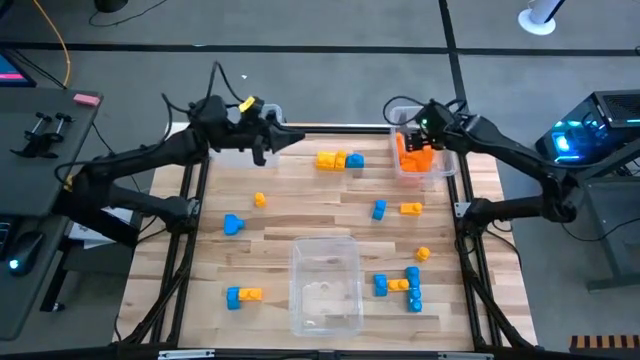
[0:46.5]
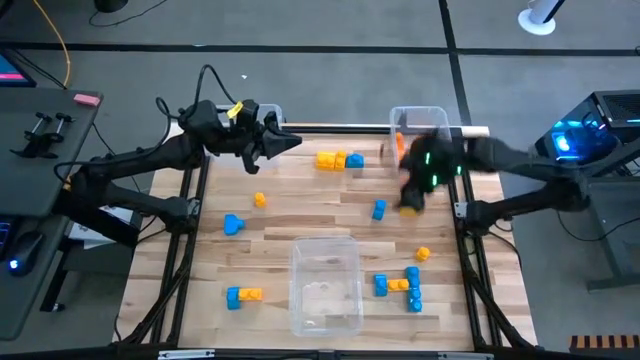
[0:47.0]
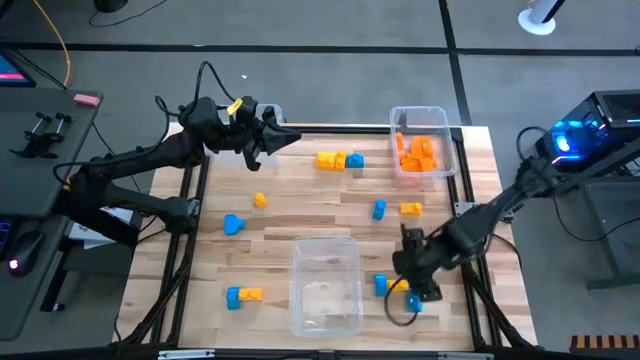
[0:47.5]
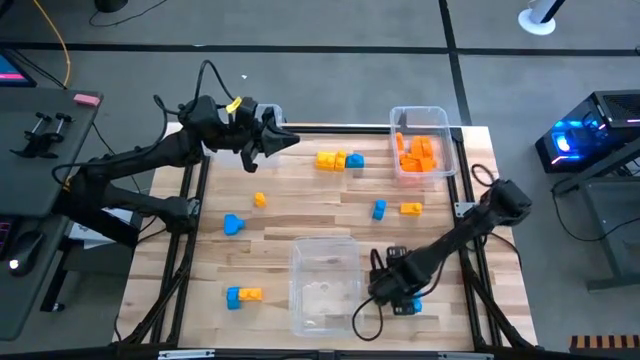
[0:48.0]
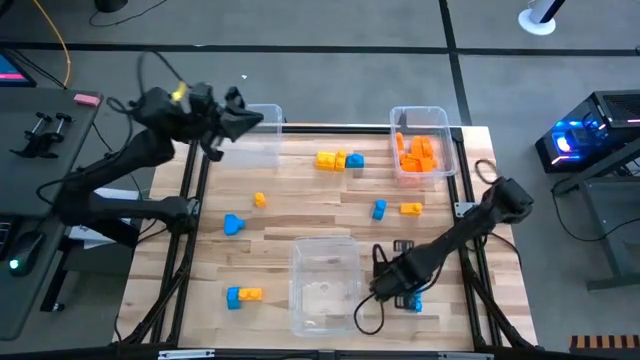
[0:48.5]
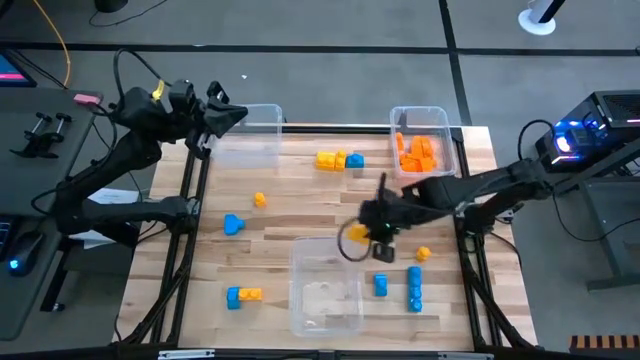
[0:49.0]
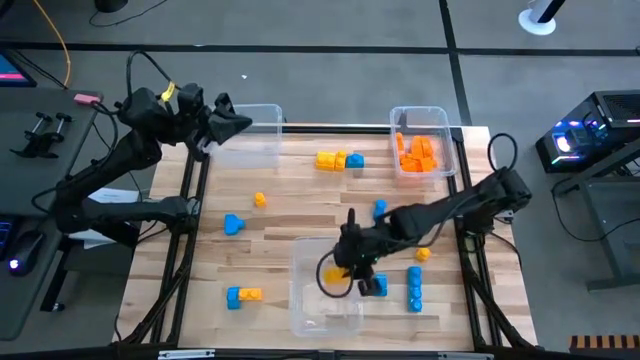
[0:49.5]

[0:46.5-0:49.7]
Task: Sort blocks
Put the yellow game piece into the bottom transparent bin

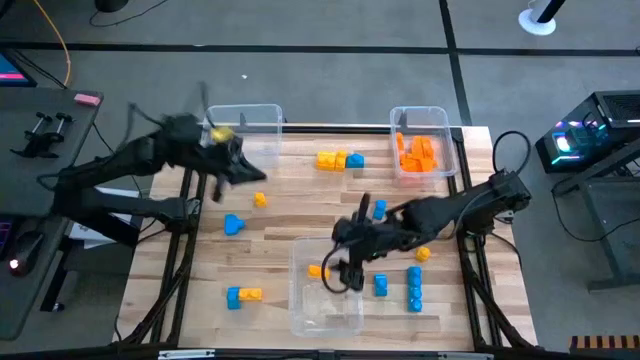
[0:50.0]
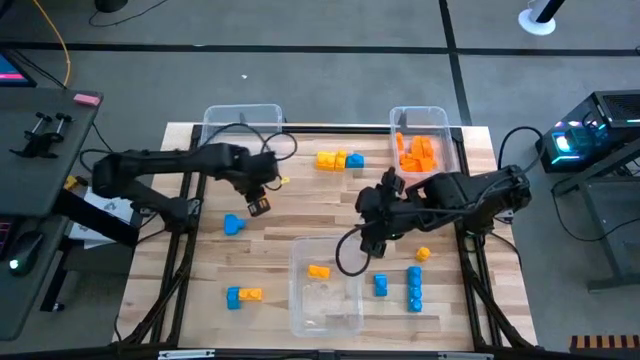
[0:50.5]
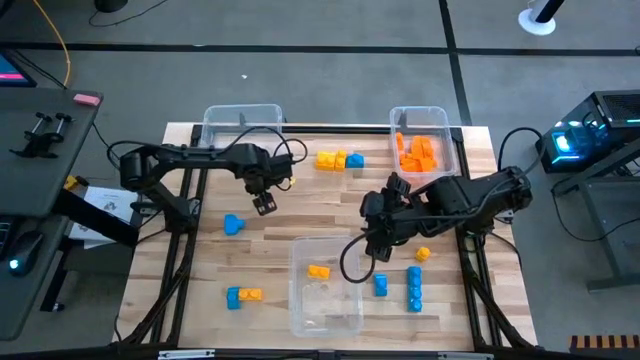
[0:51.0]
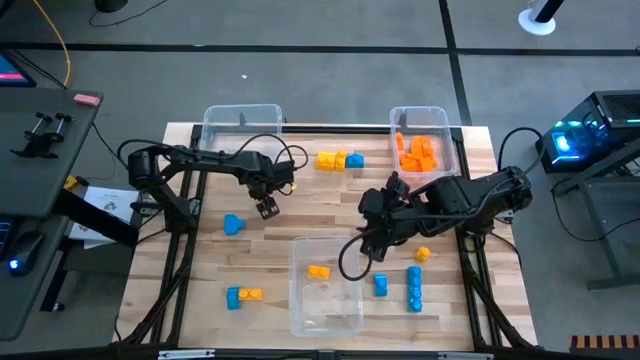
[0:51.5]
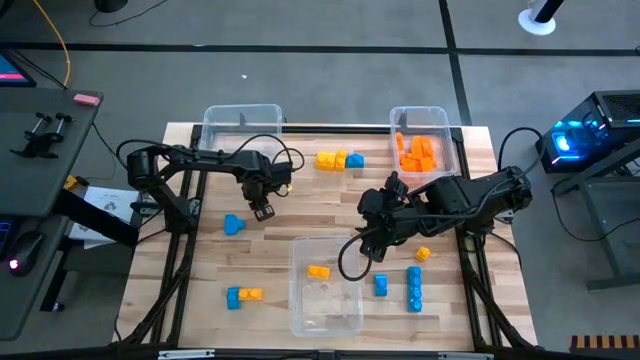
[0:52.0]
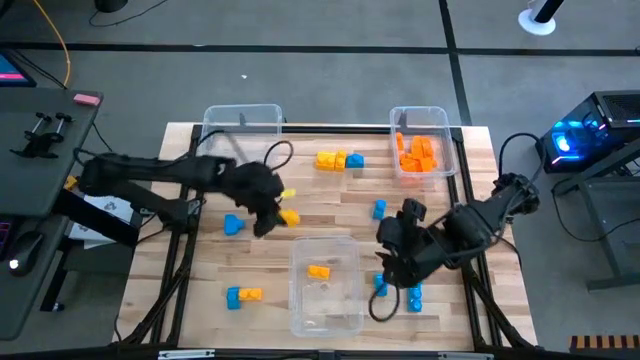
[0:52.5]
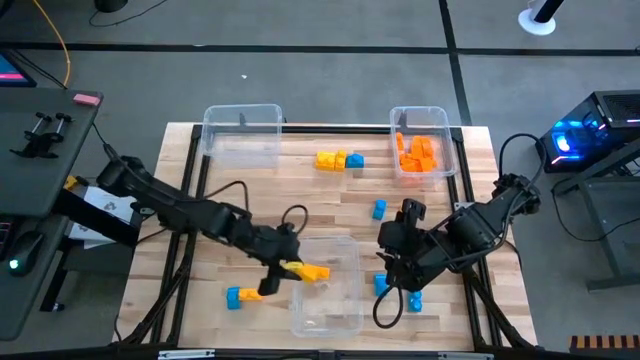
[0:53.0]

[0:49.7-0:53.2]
Put the yellow game piece into the bottom transparent bin

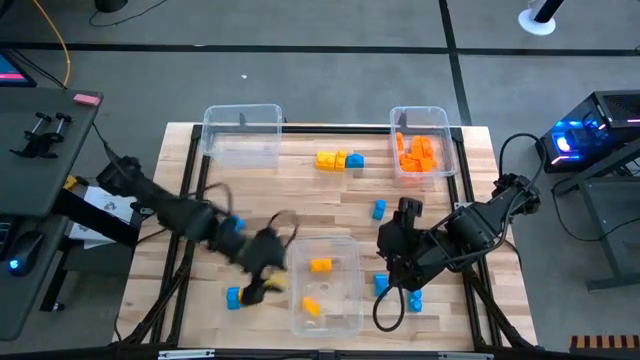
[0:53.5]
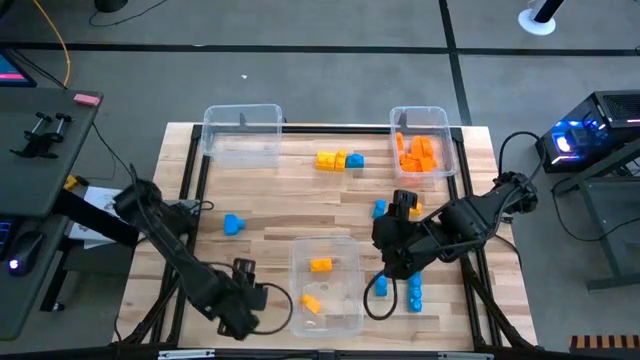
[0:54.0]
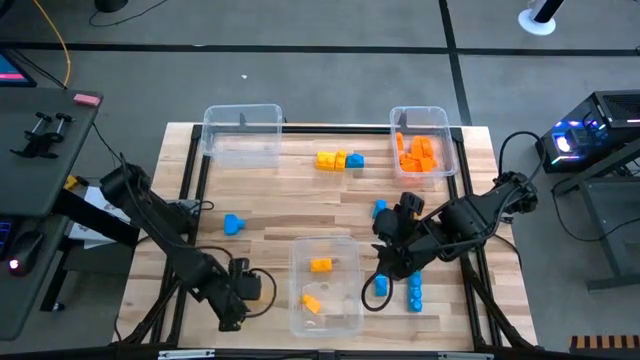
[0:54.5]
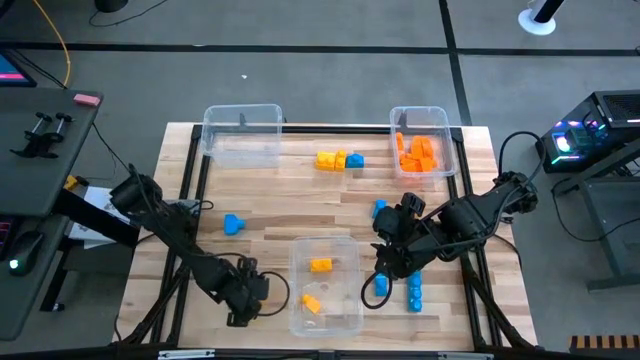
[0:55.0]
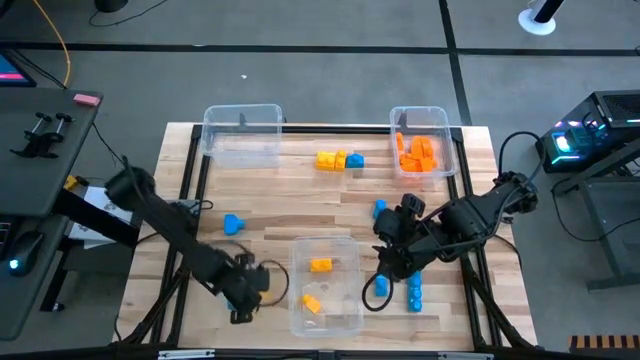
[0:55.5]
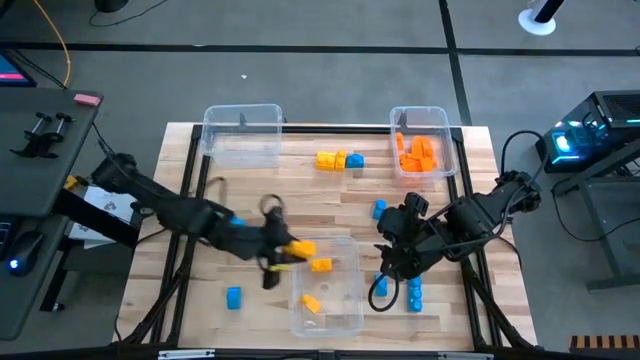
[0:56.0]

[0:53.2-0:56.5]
Put the yellow game piece into the bottom transparent bin

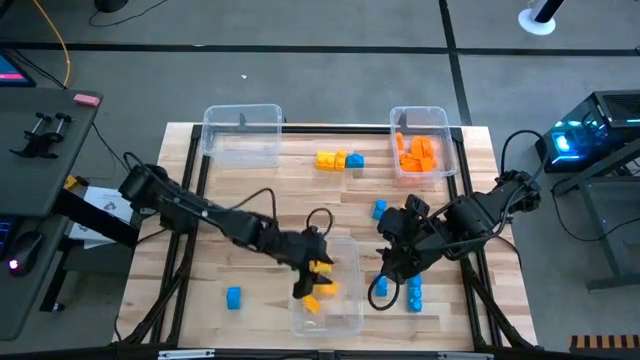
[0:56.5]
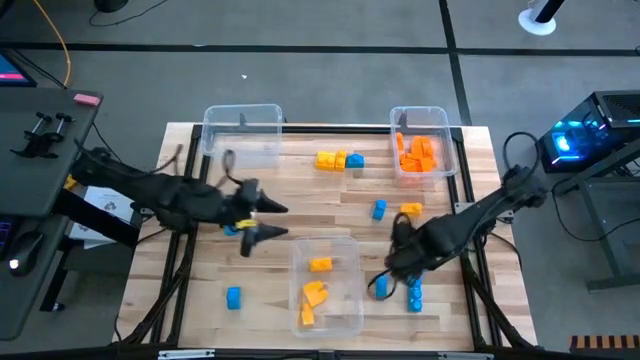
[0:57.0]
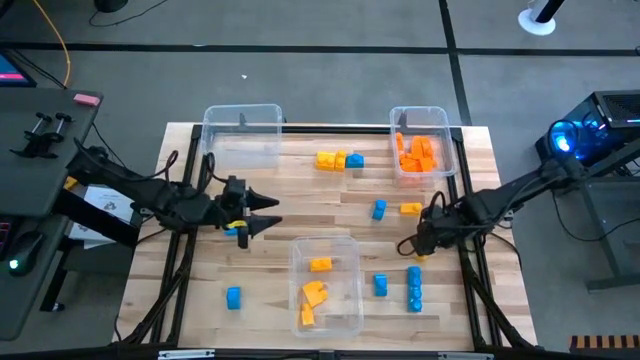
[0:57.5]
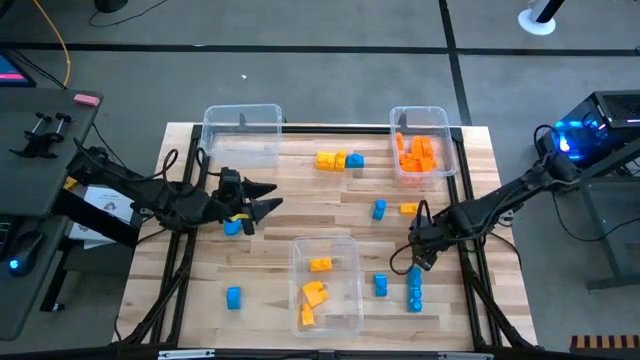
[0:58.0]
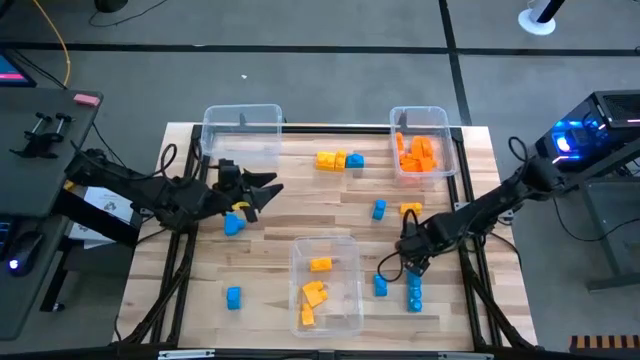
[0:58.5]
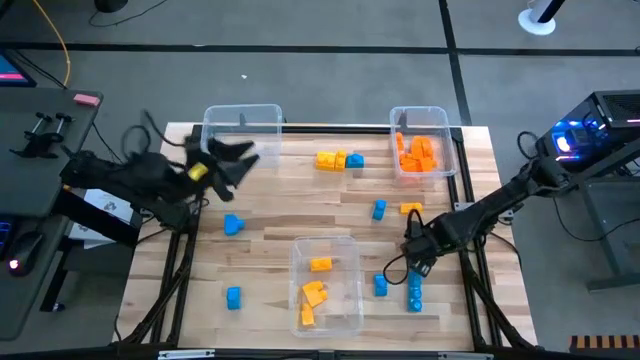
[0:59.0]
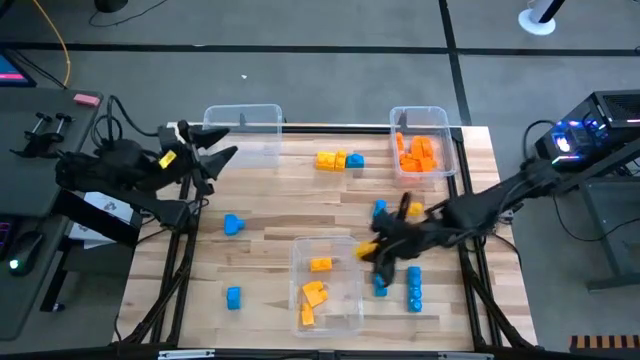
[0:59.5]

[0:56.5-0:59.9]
Put the yellow game piece into the bottom transparent bin

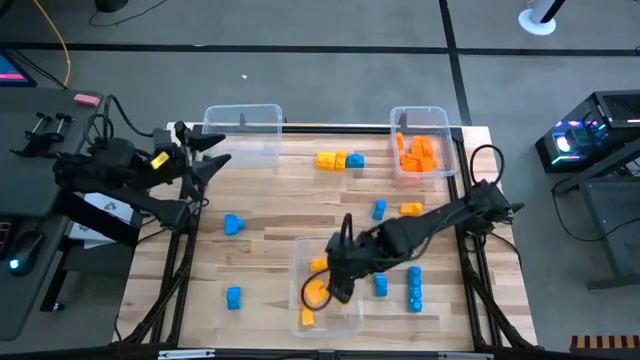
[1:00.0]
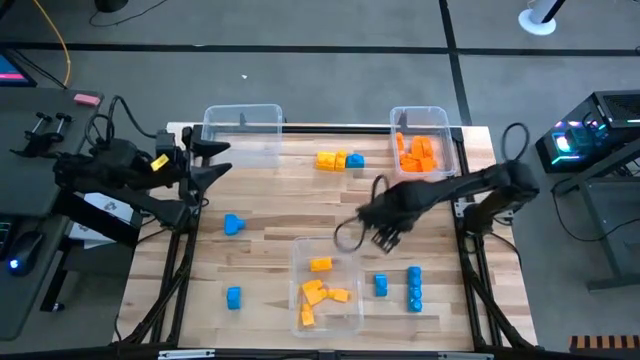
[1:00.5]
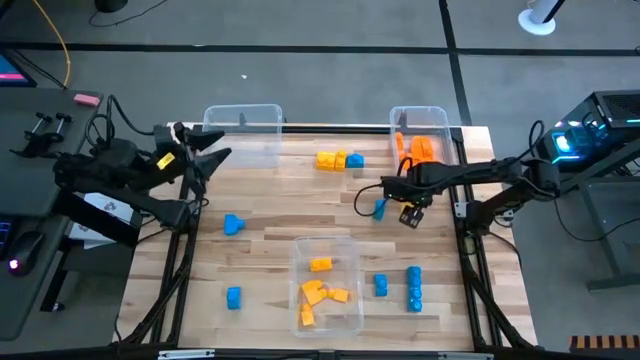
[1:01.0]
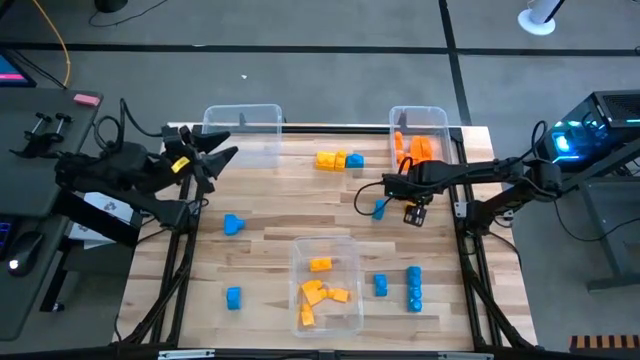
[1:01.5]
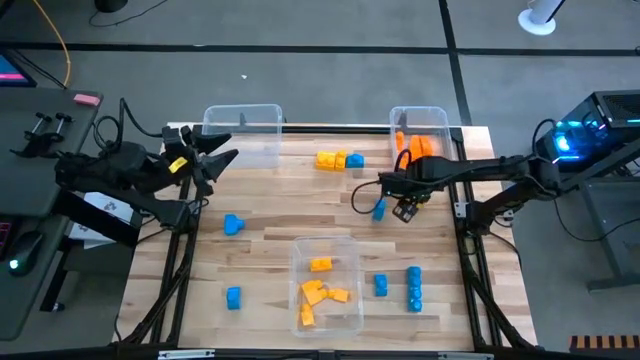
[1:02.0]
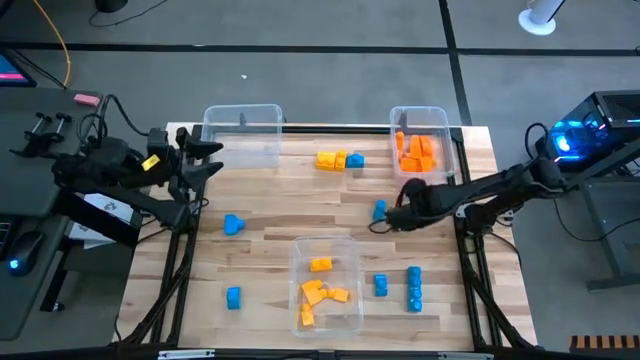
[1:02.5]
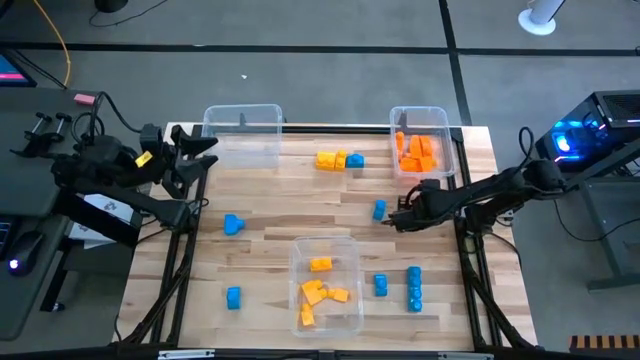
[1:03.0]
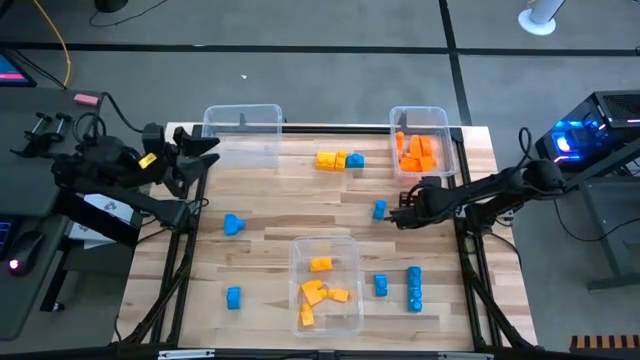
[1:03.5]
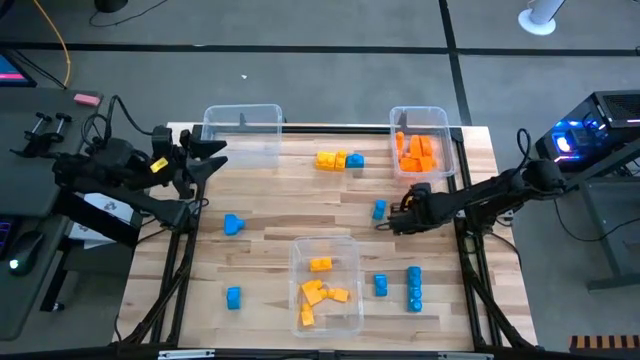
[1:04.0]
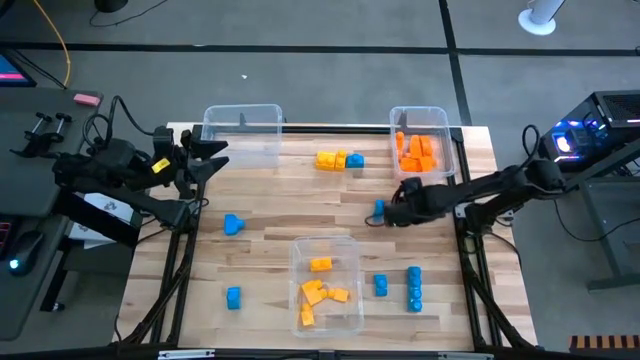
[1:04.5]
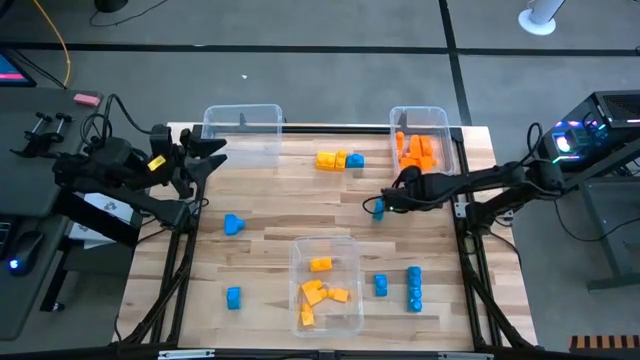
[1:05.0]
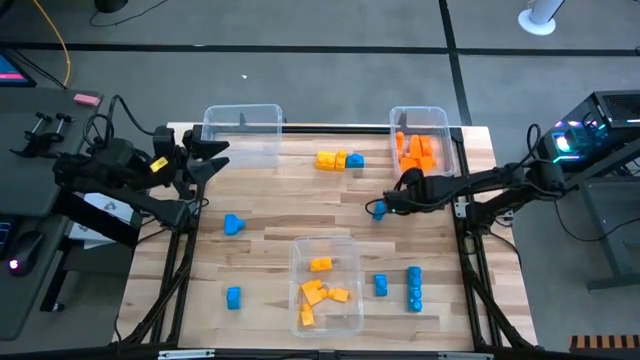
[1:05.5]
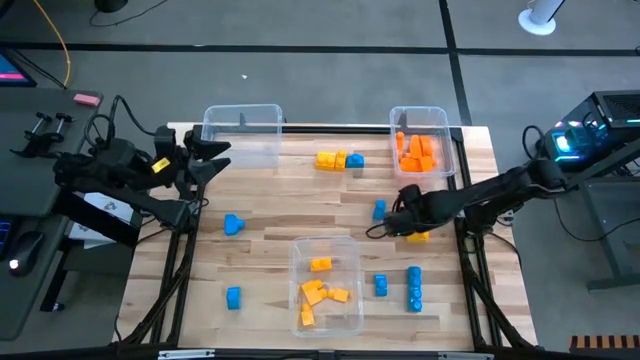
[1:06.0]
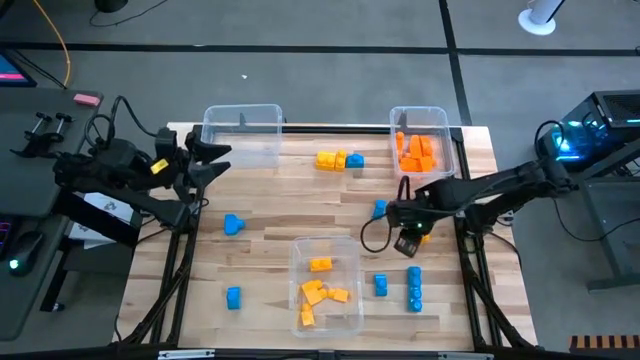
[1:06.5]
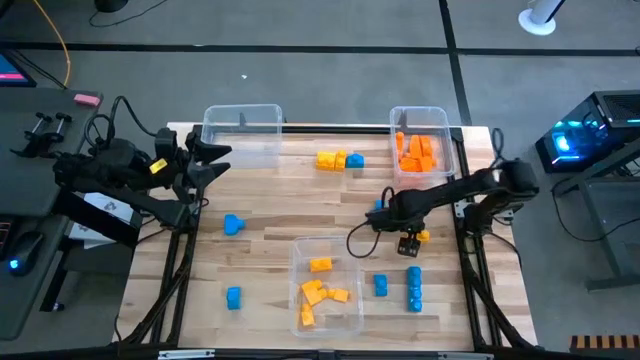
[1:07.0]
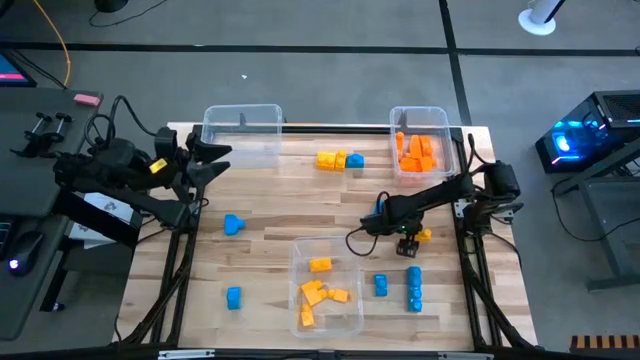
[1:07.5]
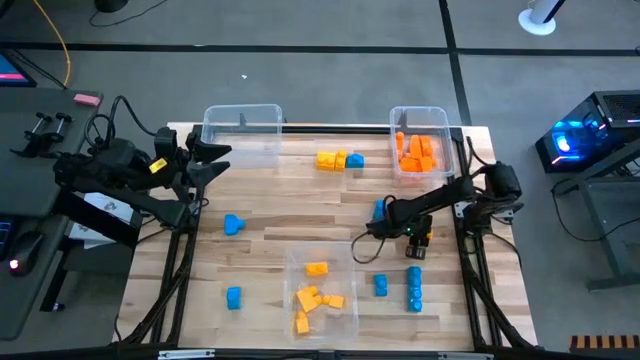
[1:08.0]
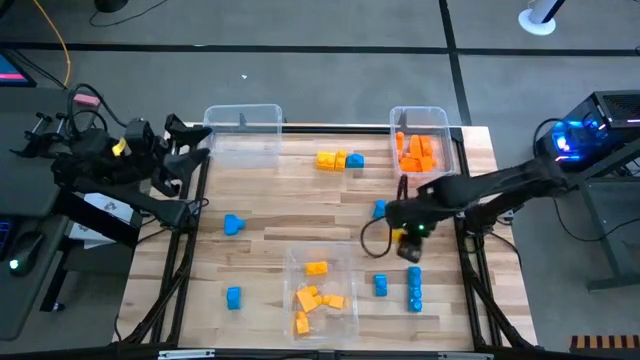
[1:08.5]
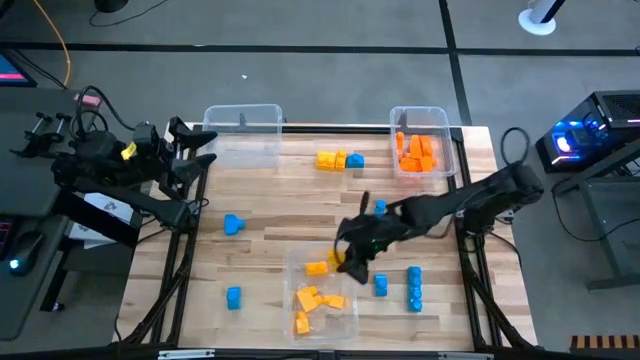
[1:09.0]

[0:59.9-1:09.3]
Put the yellow game piece into the bottom transparent bin
